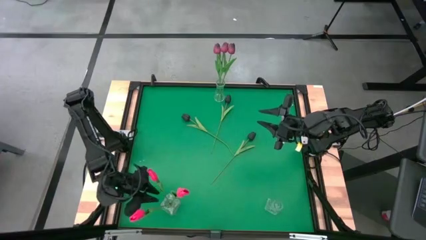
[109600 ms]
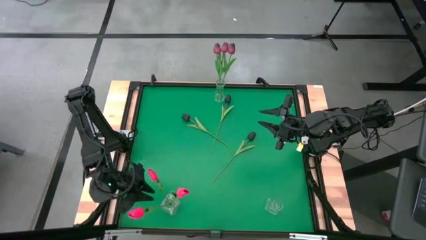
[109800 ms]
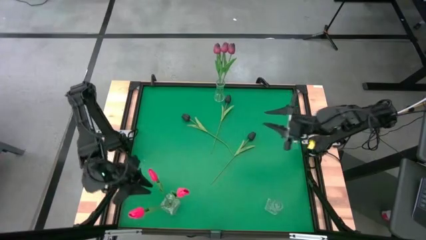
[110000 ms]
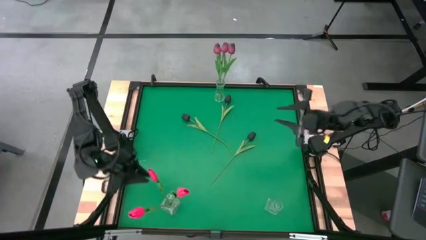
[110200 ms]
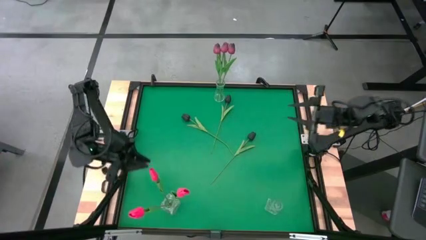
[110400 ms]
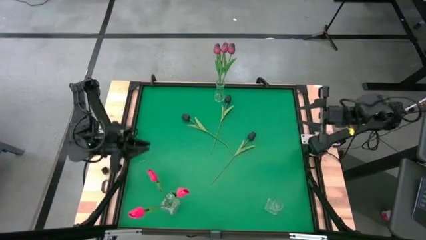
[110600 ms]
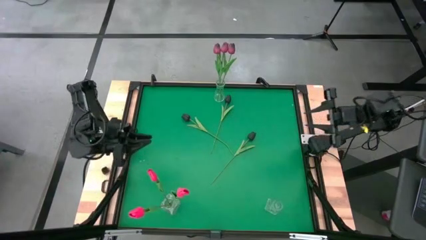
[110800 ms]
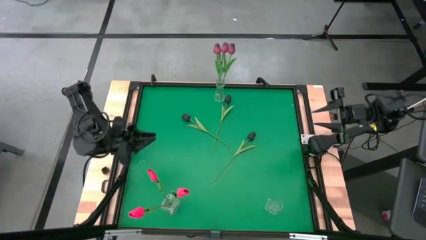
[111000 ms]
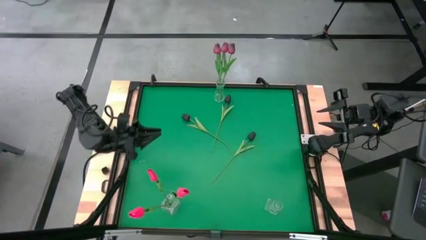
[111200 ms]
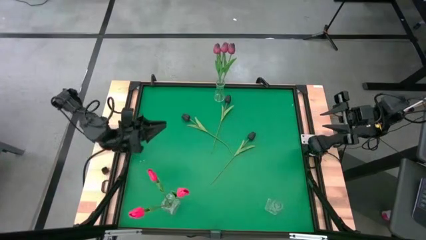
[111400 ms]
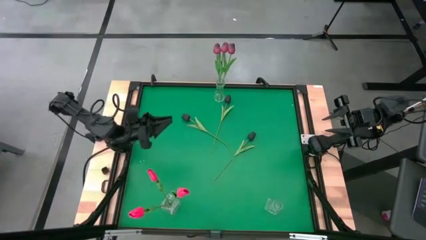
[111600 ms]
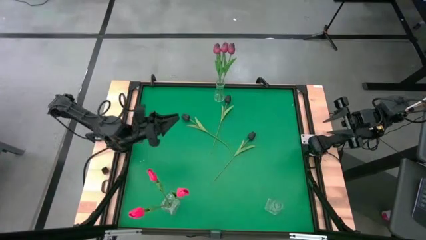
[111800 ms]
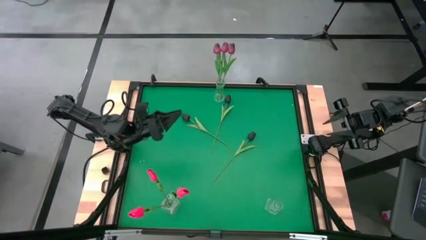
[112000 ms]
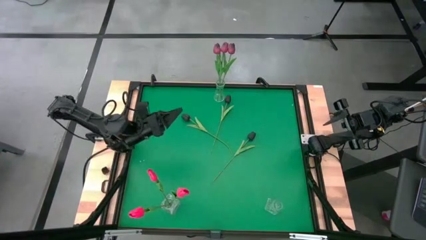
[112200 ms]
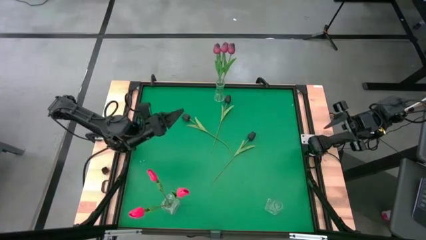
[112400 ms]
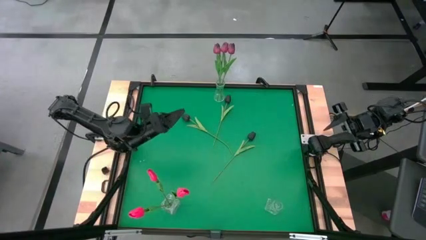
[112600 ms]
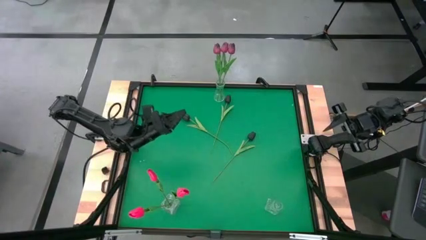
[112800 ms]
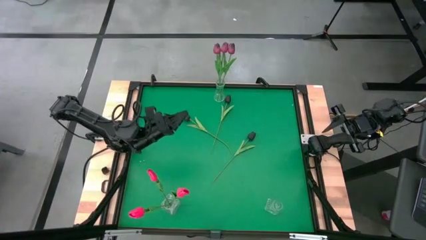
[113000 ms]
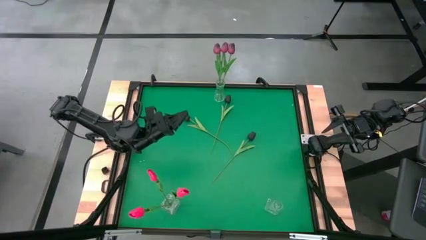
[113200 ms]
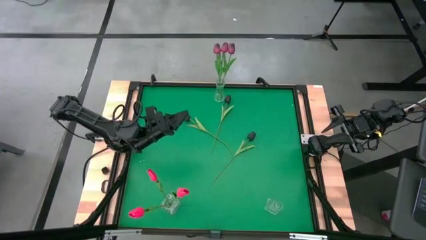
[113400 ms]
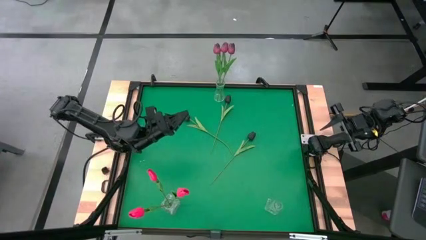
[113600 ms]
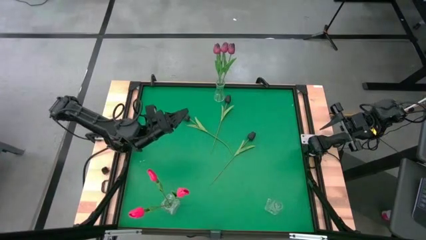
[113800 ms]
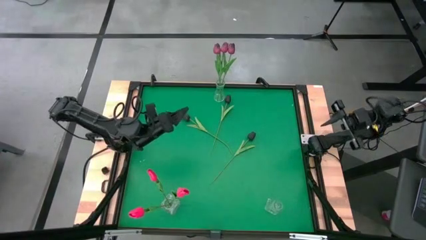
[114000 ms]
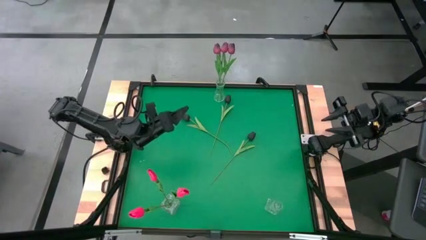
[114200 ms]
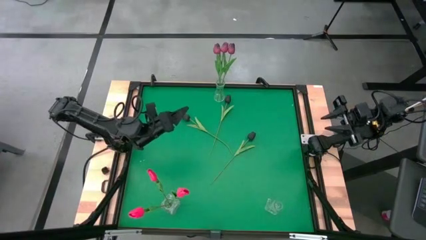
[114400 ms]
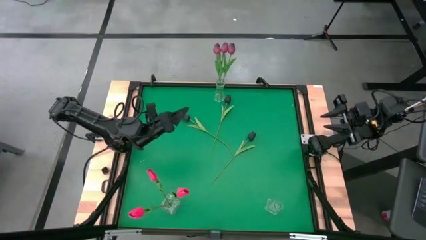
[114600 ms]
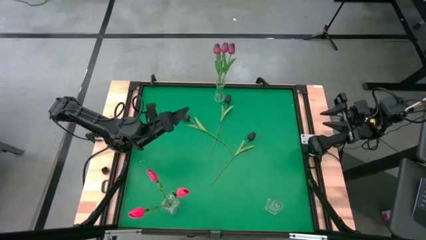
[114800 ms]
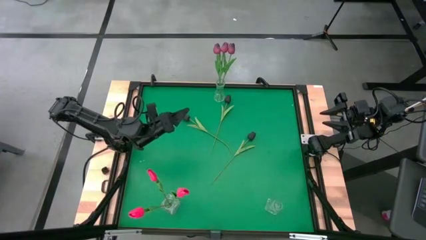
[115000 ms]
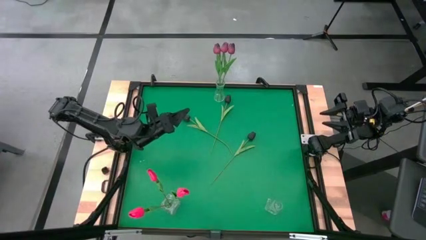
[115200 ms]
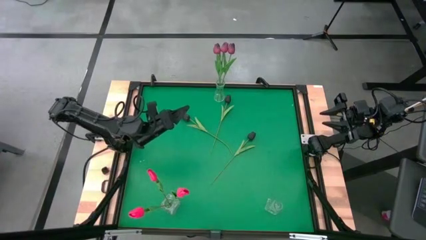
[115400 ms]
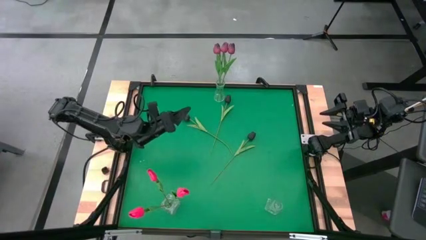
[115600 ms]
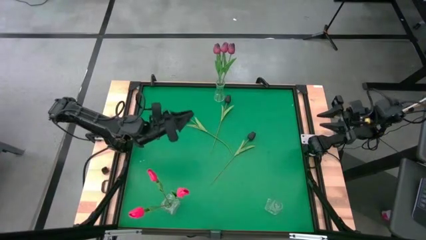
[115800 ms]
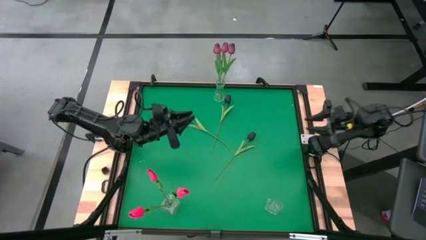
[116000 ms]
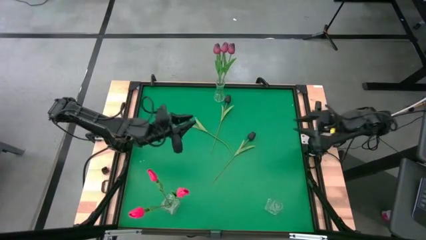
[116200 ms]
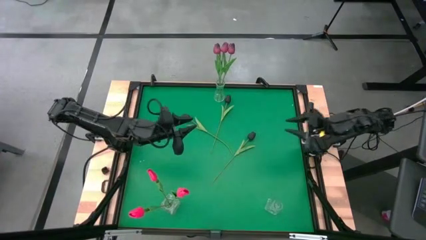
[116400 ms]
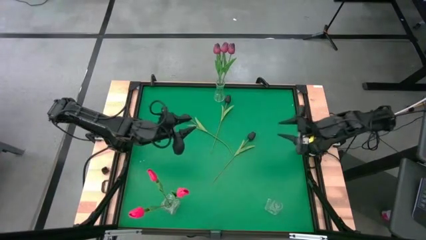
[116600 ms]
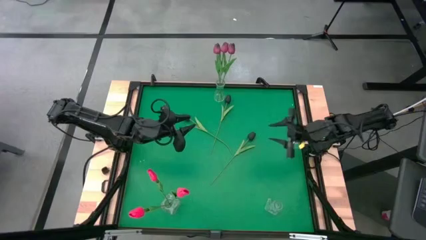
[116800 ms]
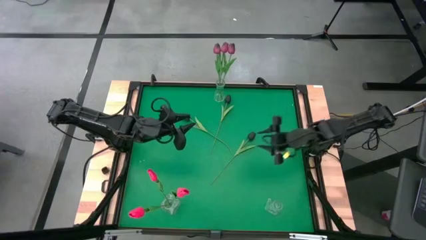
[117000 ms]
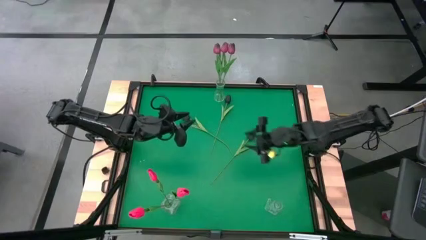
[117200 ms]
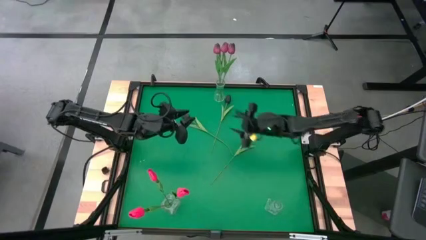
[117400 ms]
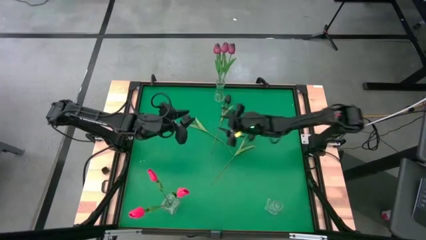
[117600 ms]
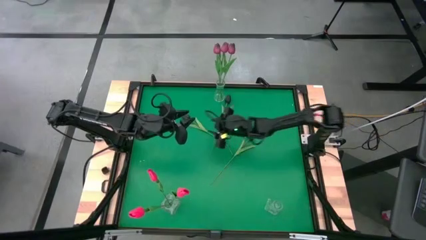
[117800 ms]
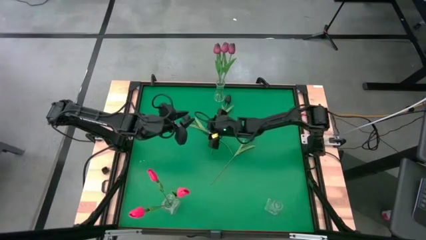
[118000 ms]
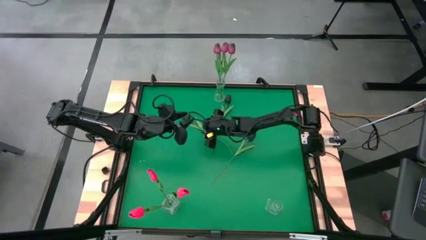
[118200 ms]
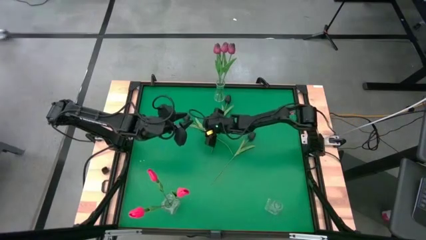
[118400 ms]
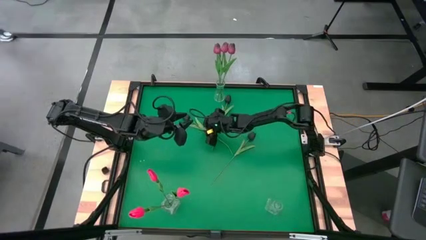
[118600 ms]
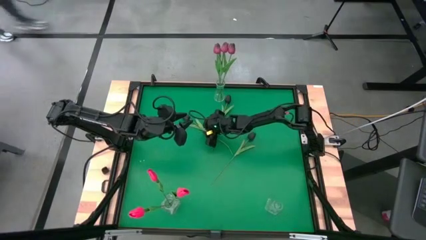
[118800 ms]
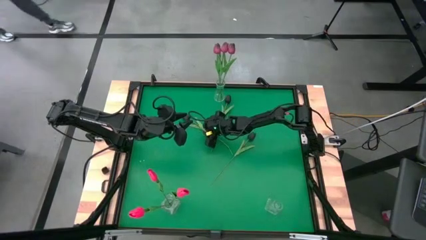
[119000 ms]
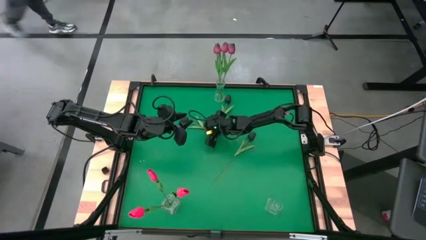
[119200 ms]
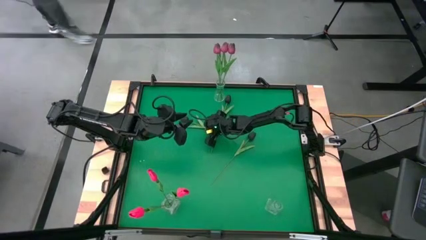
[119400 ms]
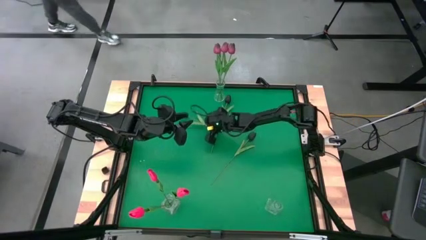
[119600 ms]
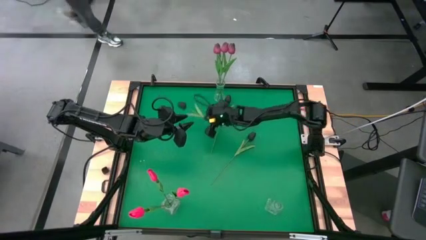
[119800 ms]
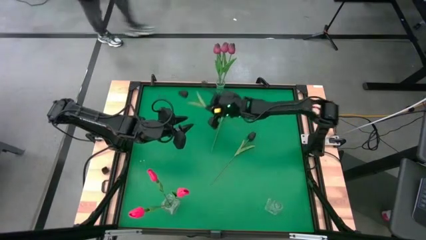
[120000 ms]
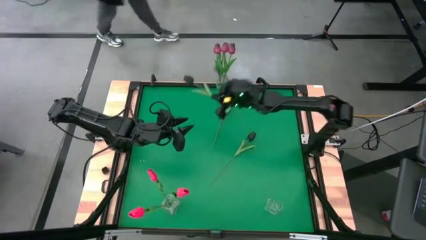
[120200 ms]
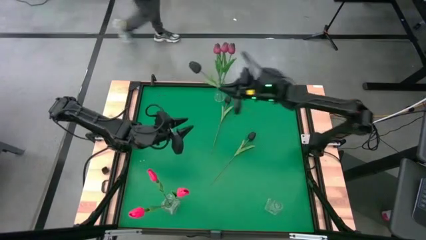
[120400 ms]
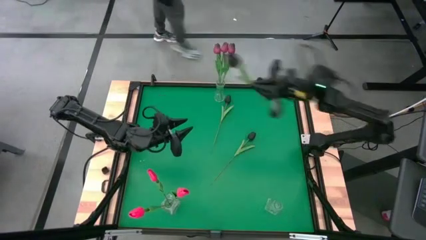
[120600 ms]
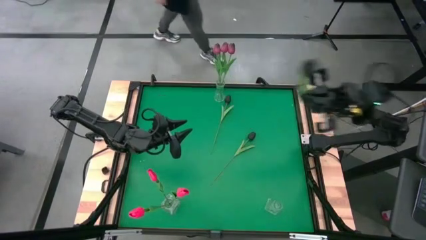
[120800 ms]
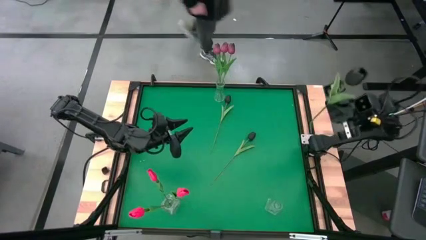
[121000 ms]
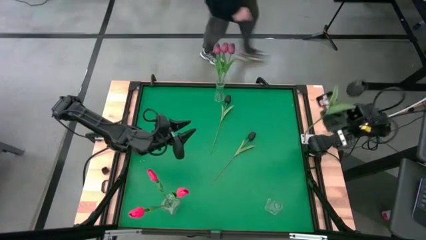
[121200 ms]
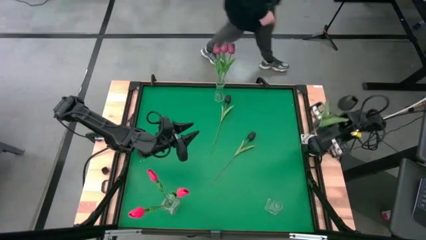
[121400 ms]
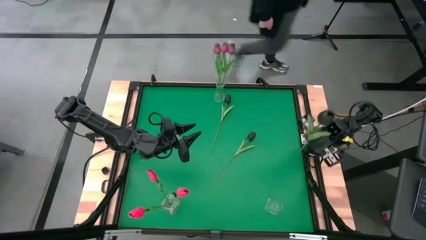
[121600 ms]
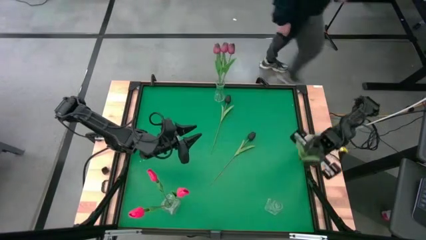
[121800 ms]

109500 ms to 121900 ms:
Task: Sort flowers into vase by color
Put the middle black tulip into the bottom right transparent vase

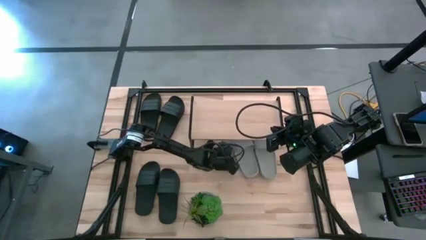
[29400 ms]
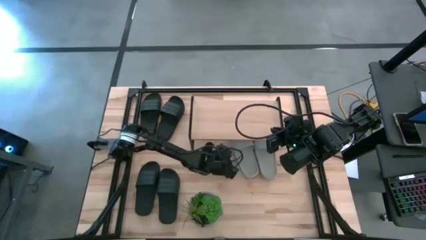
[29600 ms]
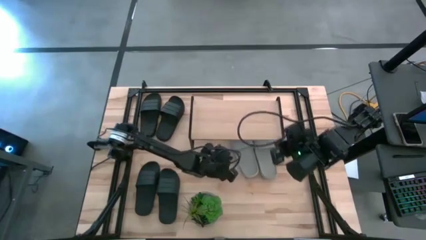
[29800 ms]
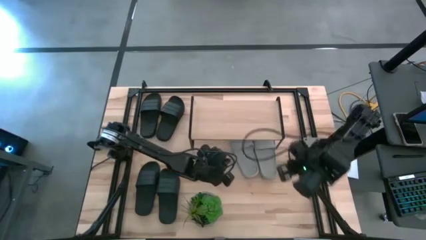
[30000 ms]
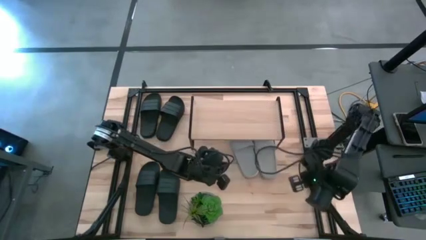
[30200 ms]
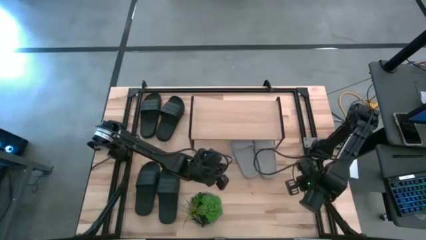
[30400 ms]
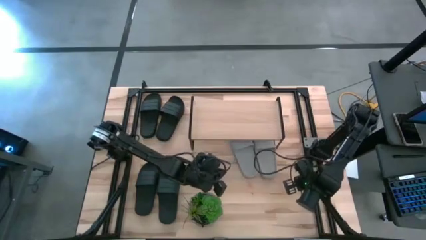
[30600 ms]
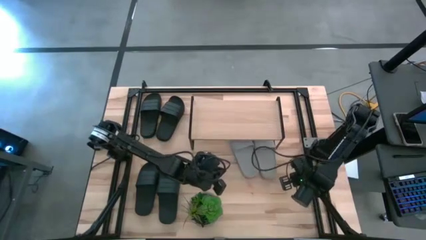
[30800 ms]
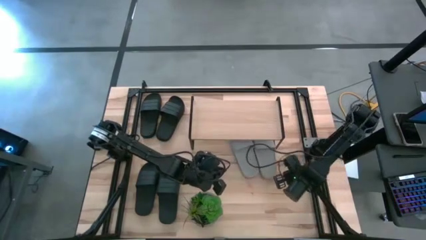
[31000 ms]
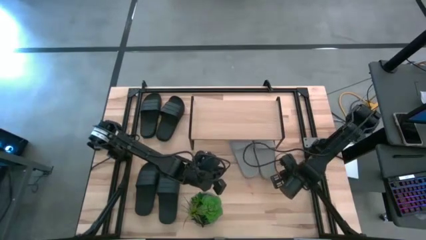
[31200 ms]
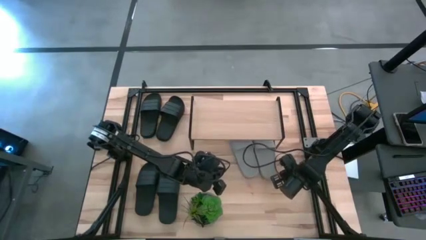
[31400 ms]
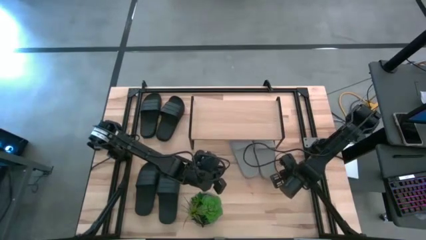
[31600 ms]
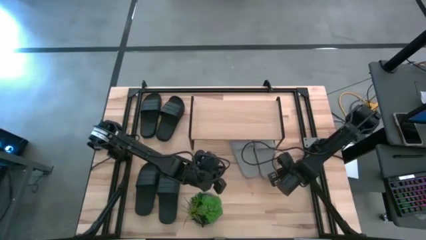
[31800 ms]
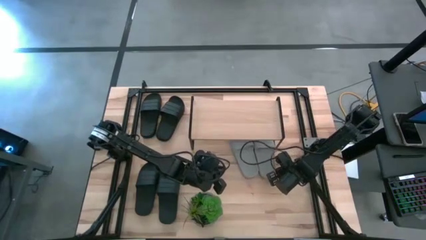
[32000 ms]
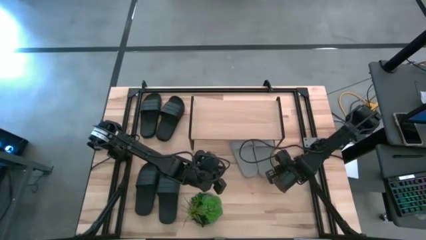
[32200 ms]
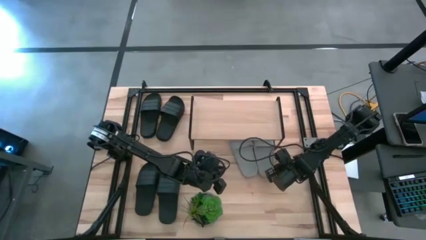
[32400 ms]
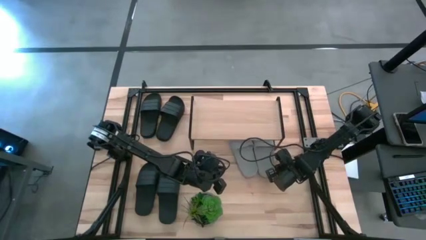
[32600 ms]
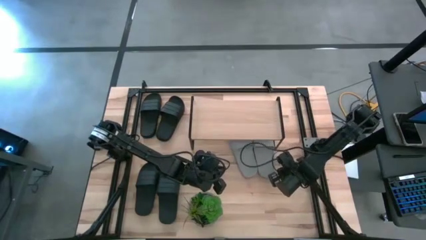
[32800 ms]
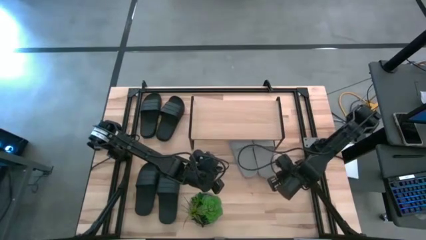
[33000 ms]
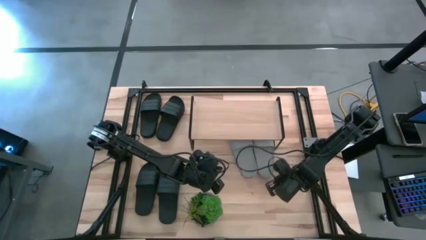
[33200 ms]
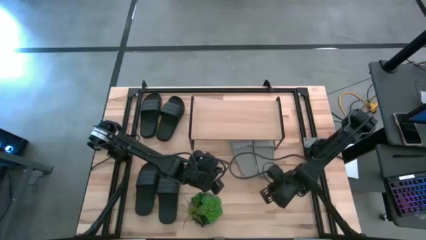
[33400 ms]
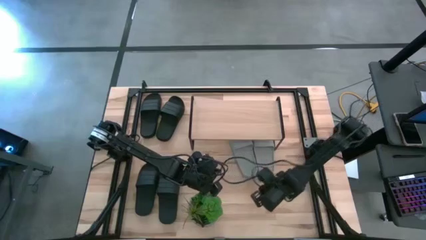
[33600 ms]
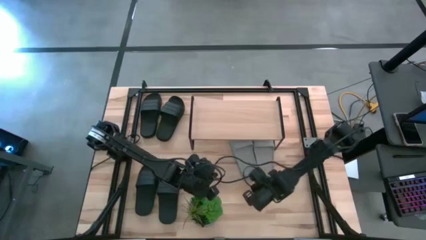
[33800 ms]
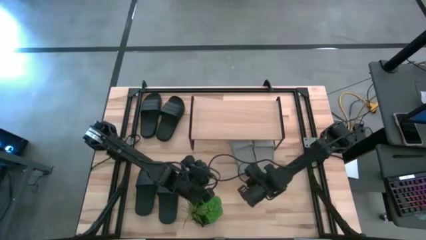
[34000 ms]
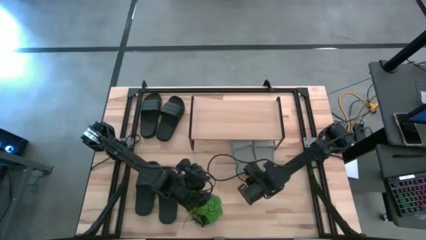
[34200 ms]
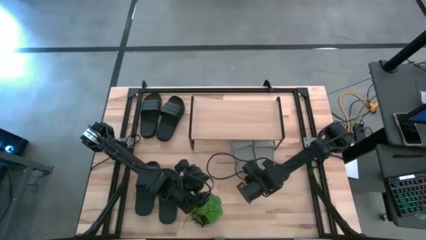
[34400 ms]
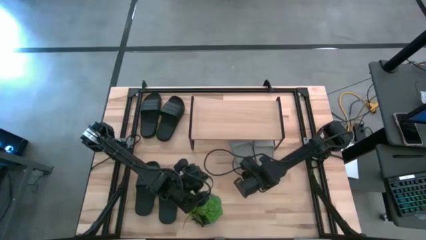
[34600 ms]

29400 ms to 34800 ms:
Task: Pick and place slides into the shelf
Adjust the gray slides under the shelf
